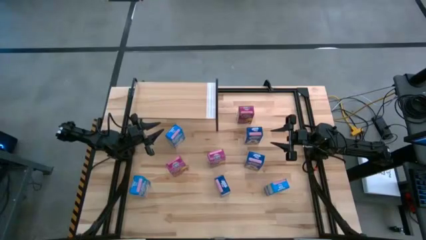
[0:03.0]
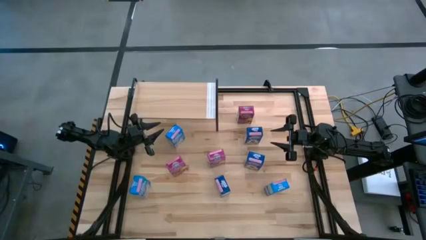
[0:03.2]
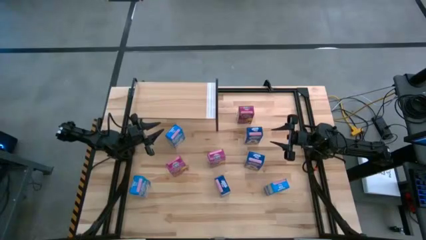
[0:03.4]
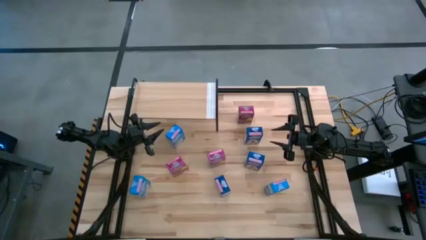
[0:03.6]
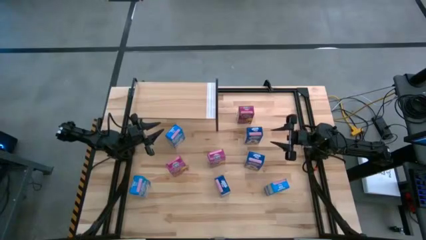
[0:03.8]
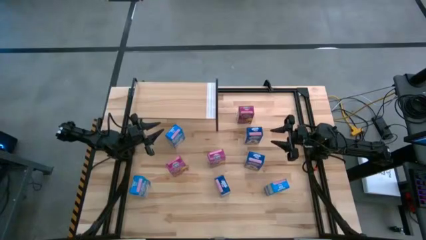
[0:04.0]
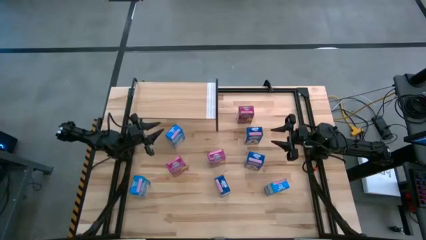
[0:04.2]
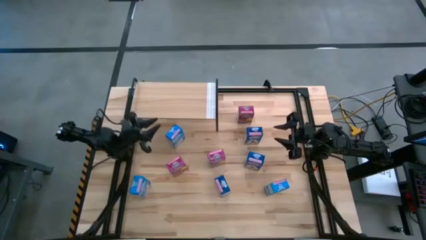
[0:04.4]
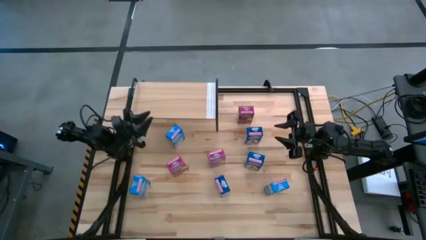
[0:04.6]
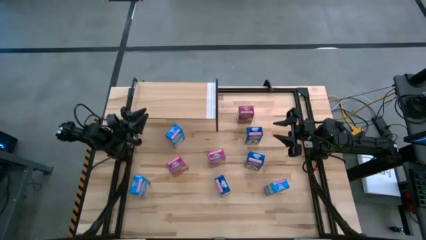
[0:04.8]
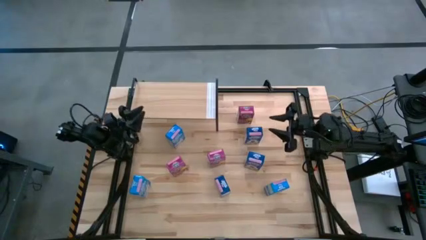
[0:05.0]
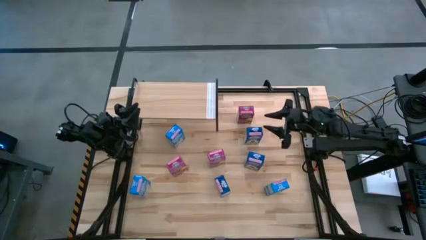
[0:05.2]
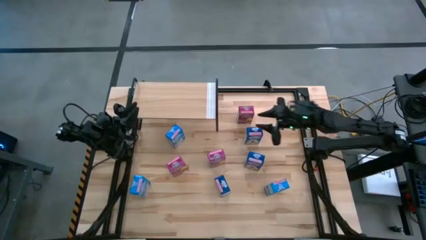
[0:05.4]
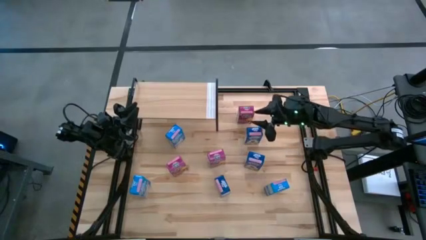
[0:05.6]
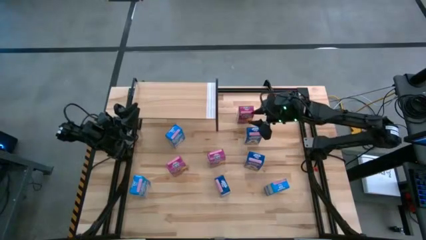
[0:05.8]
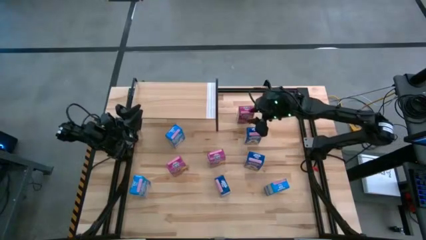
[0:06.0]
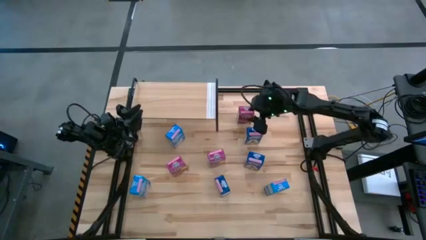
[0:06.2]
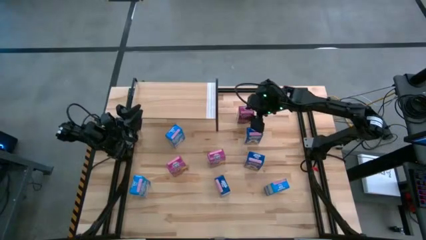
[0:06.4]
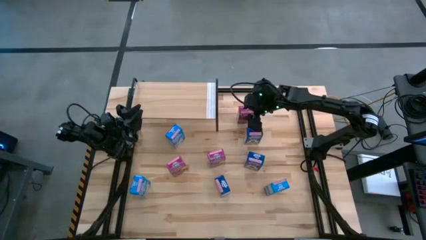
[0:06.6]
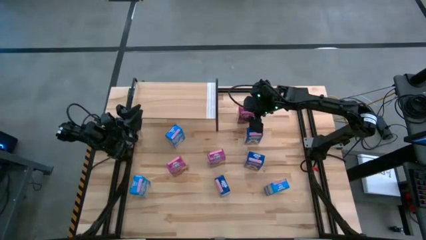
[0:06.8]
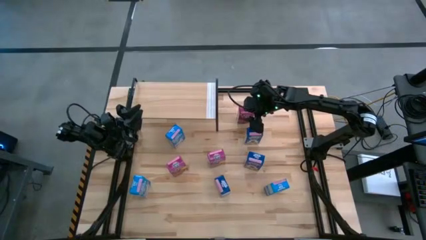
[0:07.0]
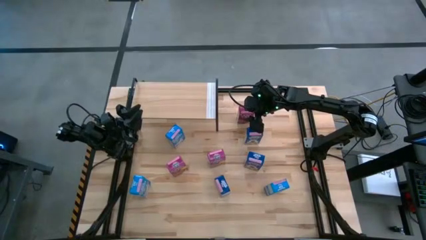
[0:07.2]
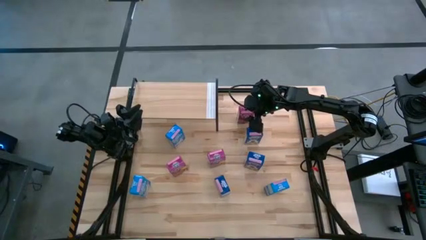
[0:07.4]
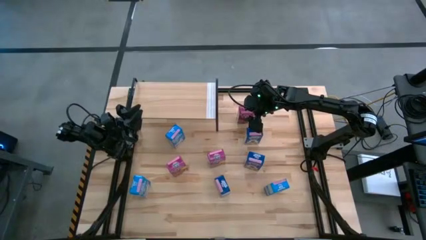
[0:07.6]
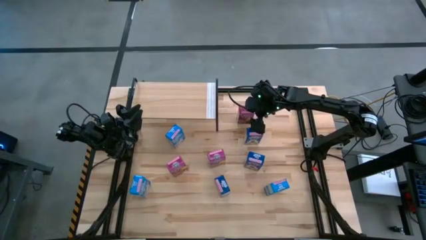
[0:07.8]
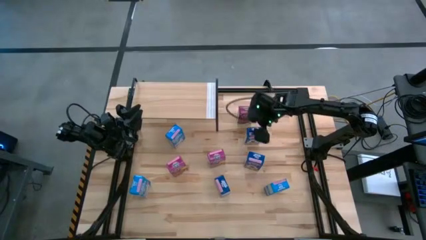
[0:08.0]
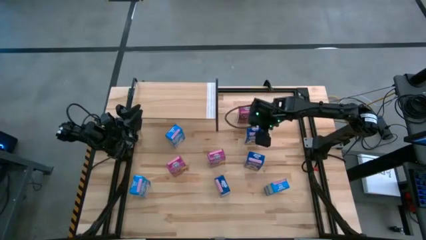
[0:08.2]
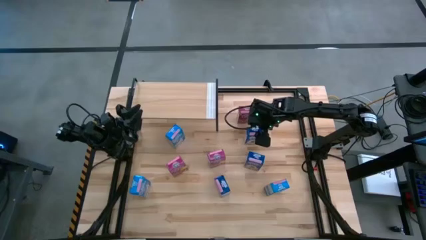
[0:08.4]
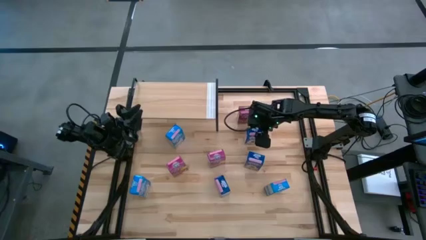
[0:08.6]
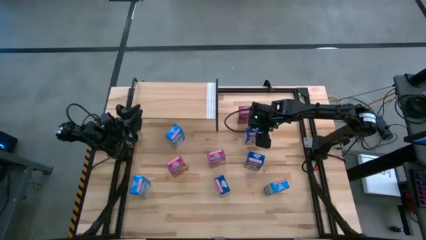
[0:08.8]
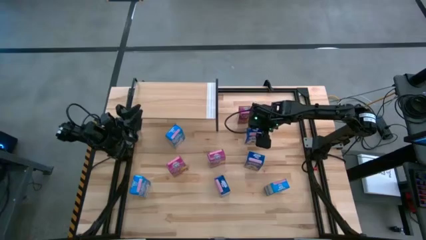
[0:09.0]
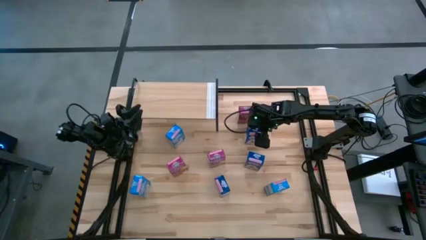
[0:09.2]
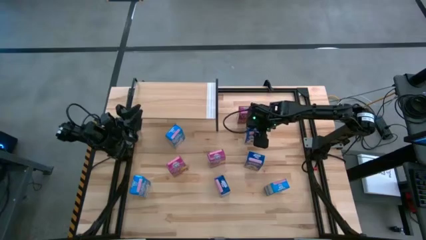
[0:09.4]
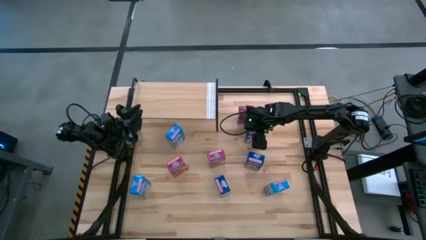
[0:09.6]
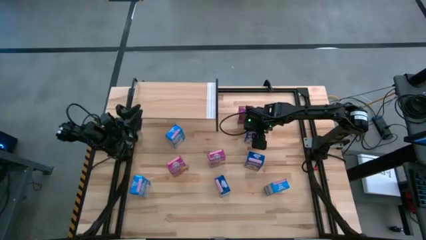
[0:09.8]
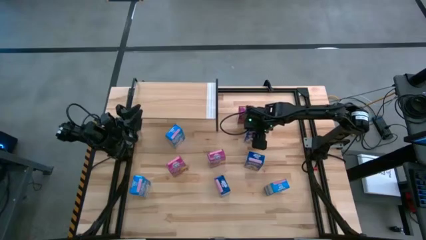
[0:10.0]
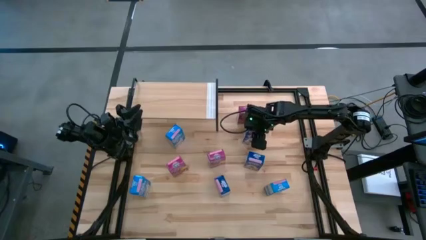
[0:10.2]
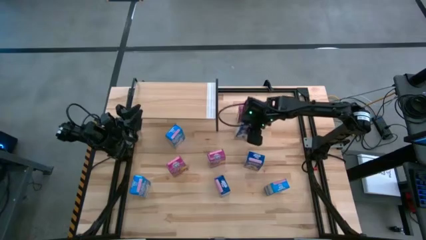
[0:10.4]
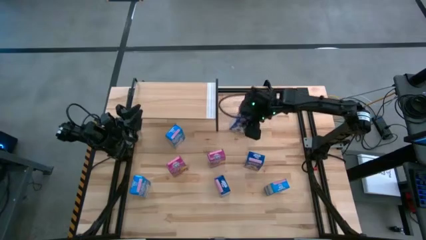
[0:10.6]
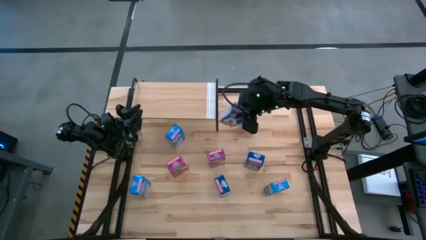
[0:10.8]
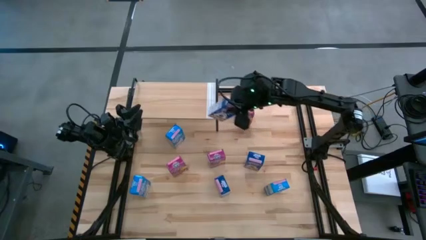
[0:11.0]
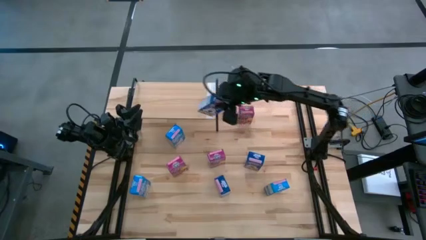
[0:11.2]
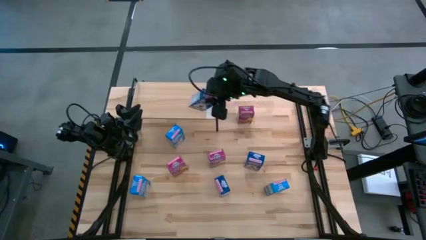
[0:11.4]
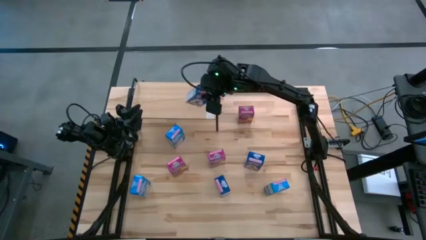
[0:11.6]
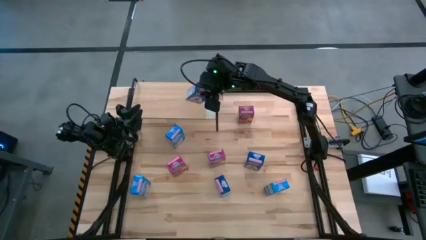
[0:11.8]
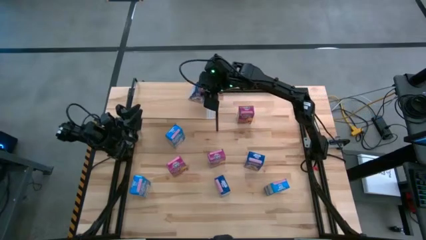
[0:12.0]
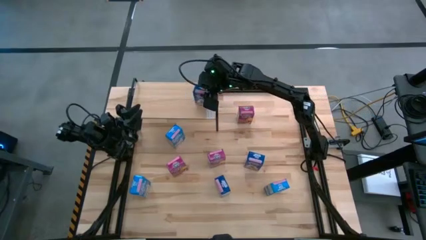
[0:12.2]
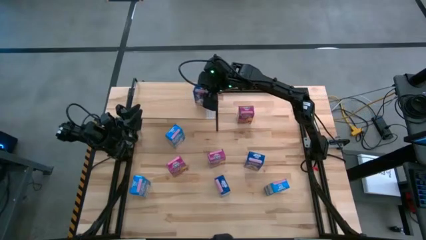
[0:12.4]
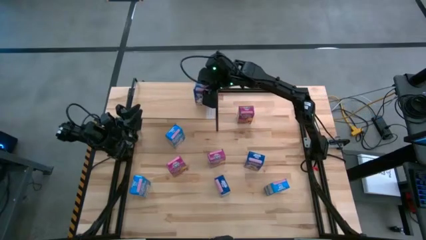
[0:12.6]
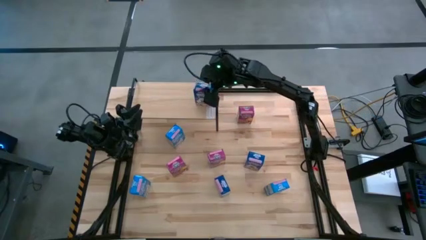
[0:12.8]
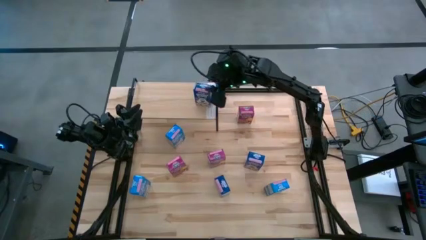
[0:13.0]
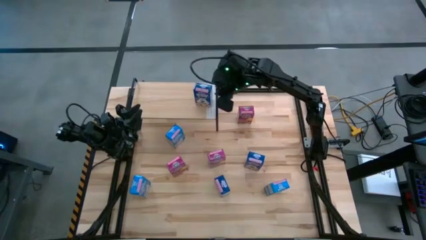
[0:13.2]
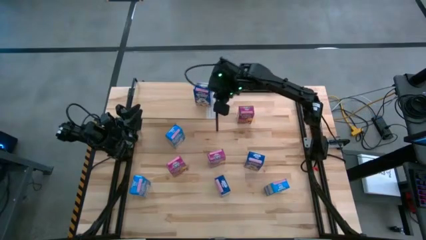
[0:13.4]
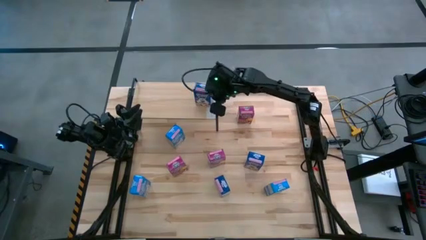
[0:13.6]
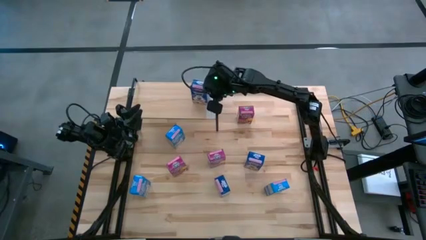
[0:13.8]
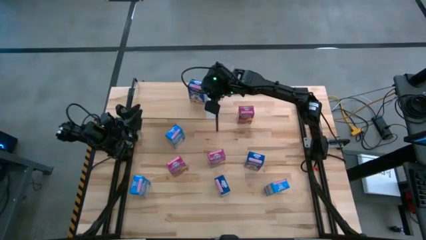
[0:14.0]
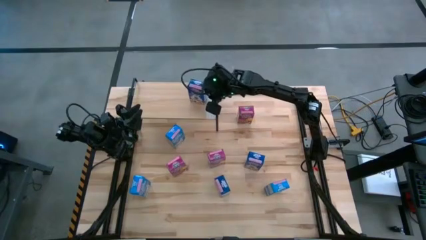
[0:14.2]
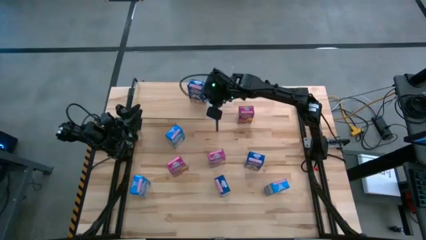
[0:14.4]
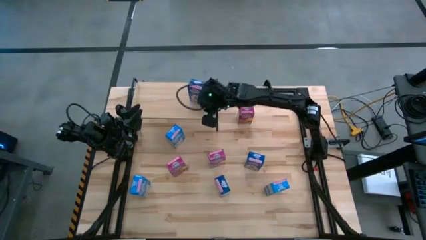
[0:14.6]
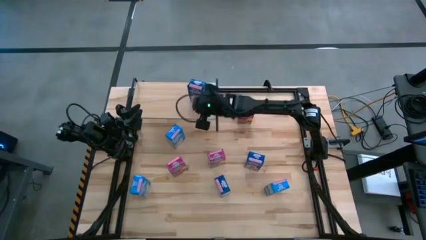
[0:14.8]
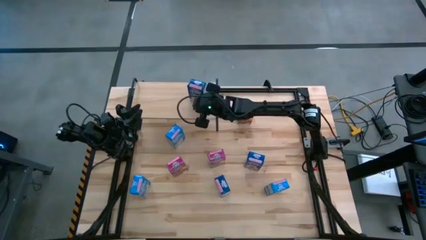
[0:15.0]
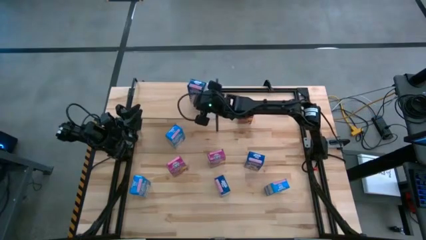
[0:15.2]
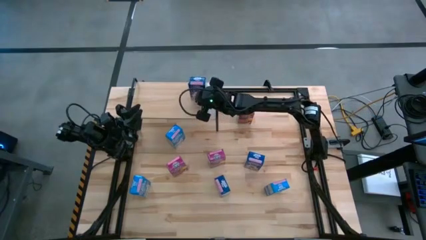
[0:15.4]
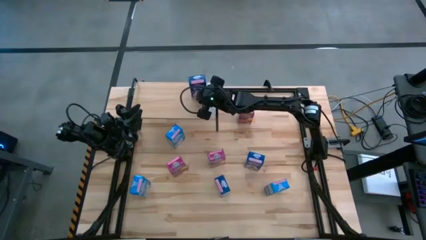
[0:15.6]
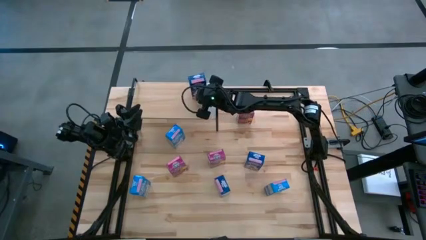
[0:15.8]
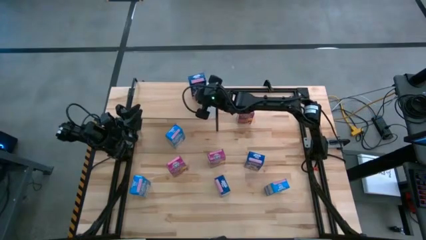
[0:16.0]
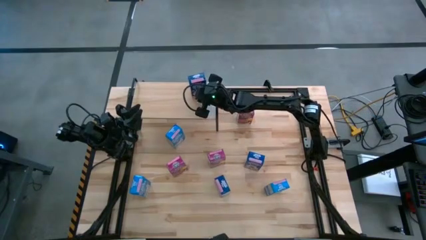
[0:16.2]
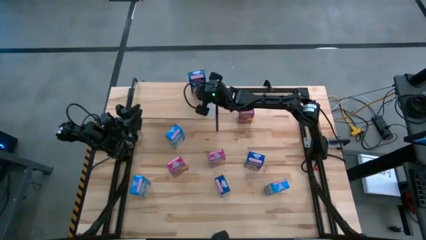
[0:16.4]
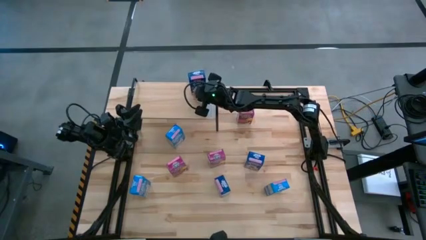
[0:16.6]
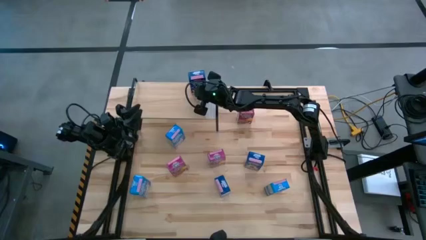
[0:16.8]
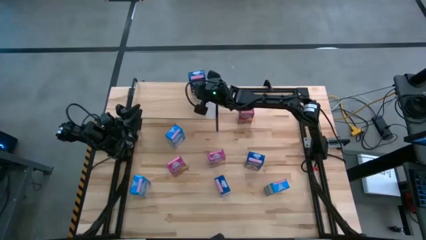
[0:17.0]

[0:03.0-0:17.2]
Task: Stack cereal on shelf
Put the top blue cereal box on the shelf
